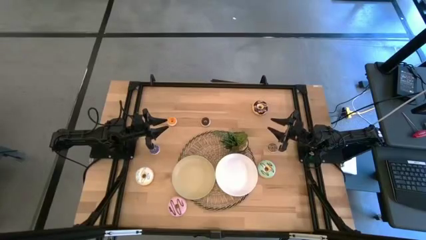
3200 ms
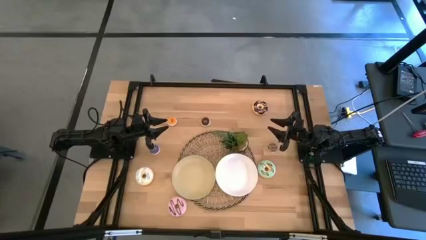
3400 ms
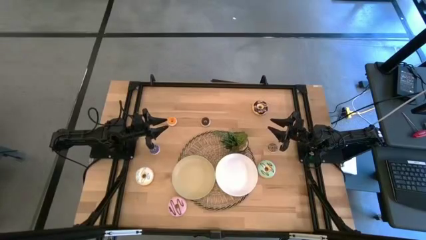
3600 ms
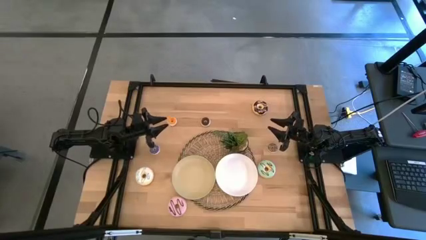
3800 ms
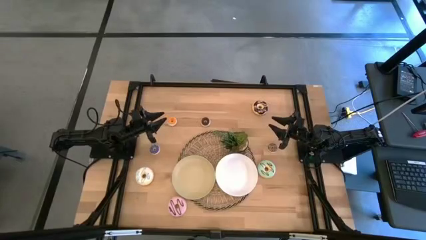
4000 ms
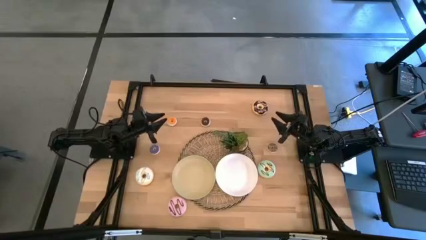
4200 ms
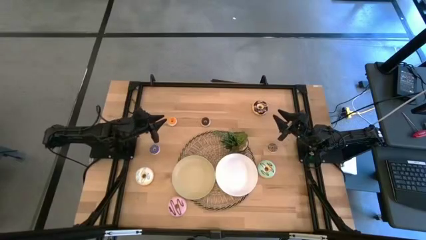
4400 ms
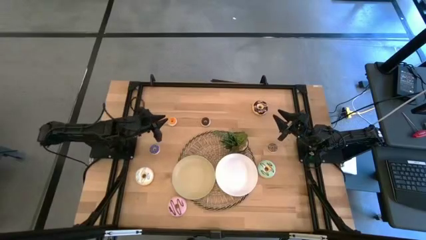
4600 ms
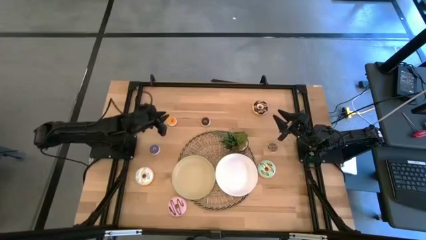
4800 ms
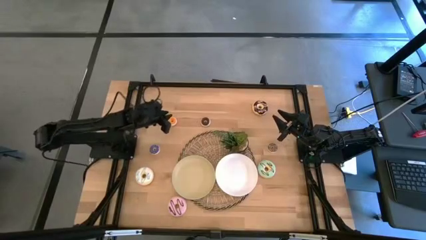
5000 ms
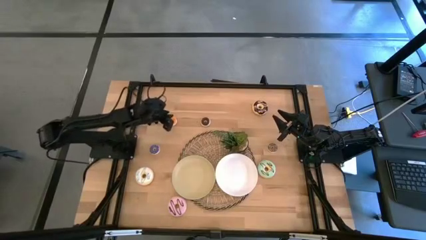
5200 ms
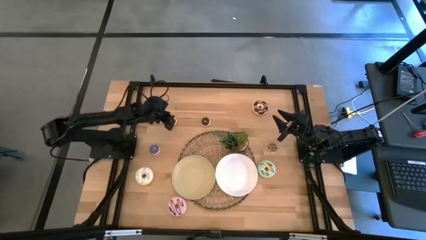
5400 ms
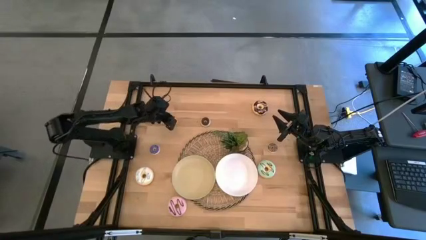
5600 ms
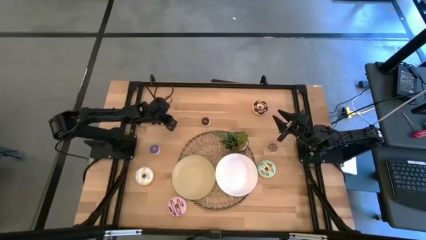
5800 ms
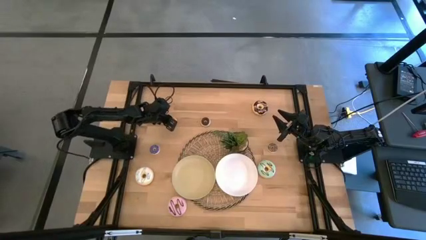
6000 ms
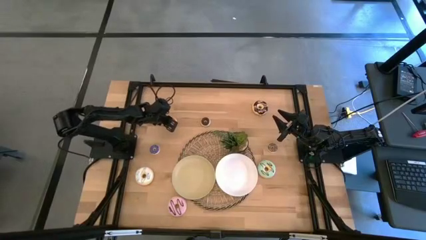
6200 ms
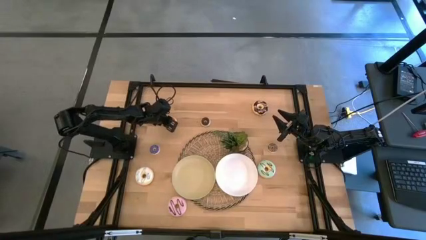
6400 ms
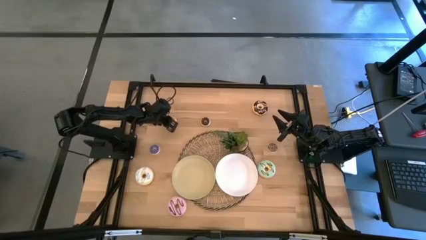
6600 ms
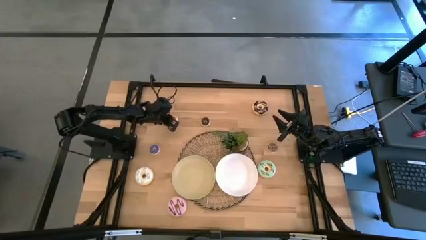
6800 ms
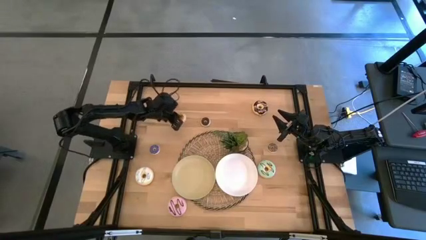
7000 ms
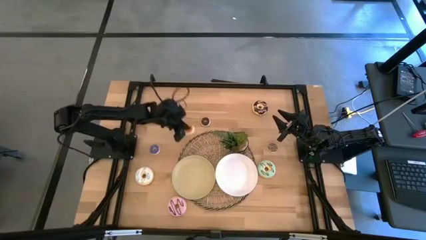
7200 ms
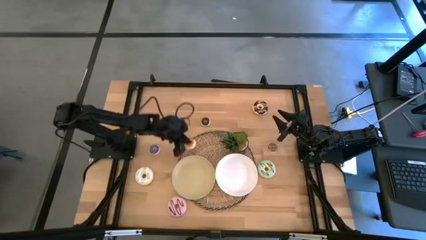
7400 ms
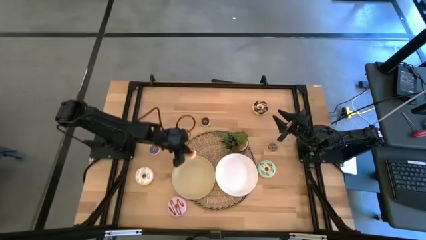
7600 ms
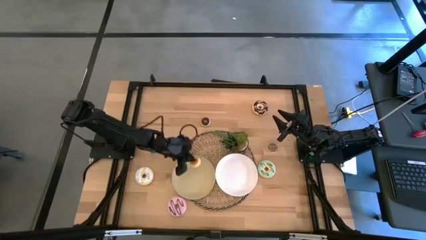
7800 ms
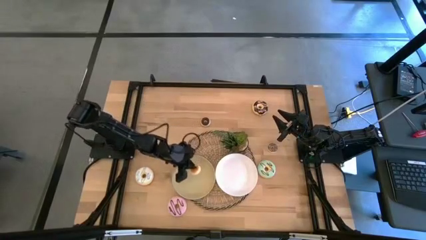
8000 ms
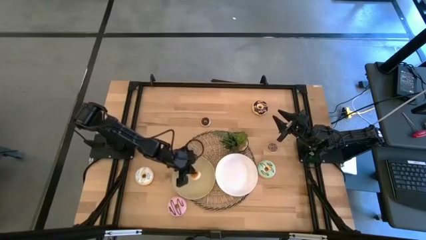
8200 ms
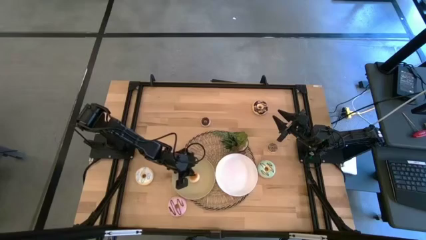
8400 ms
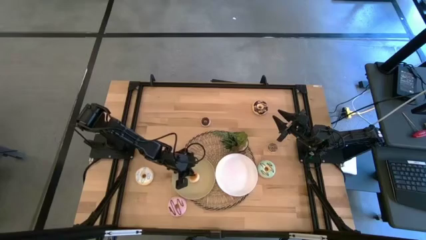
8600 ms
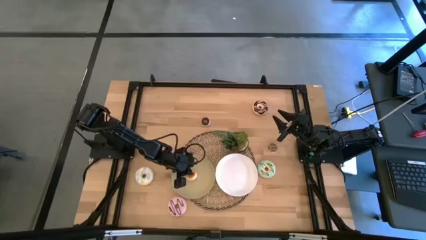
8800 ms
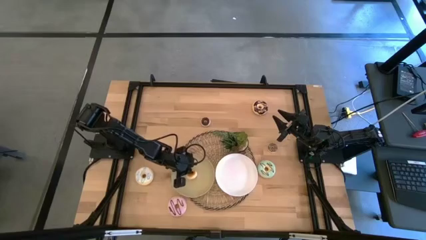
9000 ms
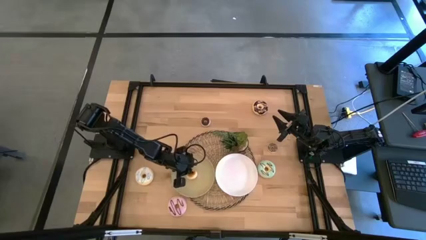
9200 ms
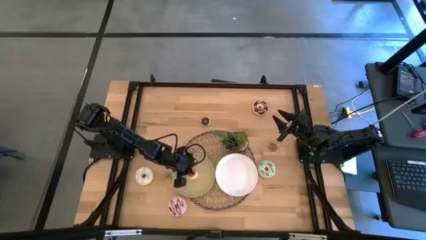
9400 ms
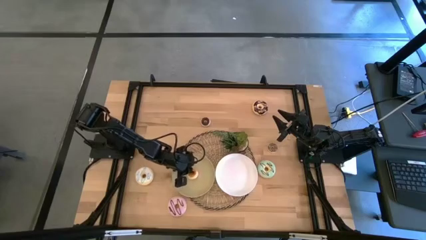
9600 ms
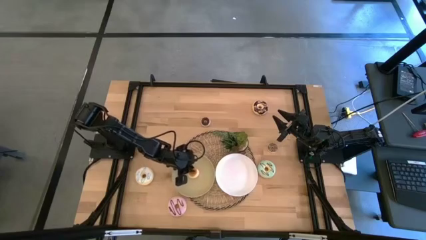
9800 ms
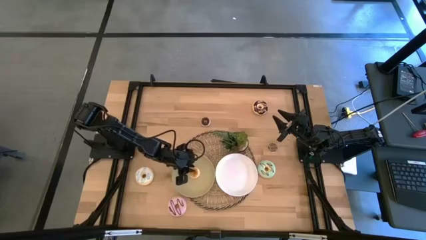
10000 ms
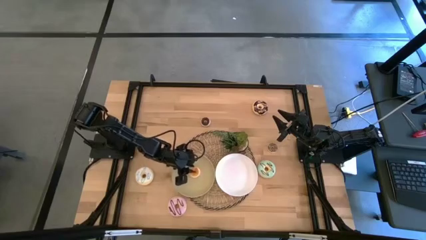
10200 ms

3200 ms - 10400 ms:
Task: Pick & Place donuts
Put the small orange donut on the brown plate

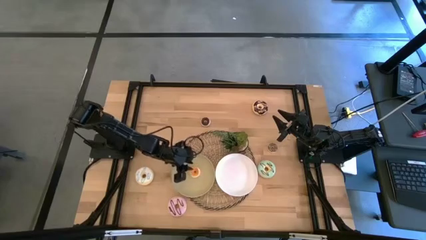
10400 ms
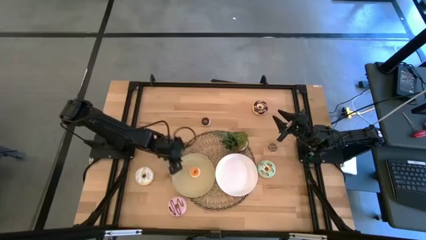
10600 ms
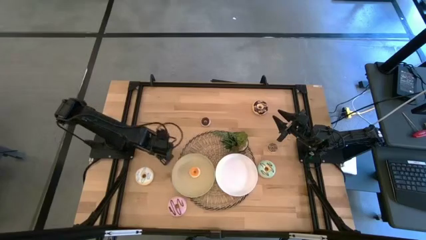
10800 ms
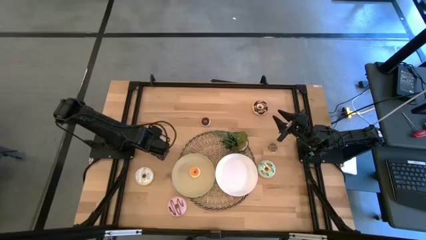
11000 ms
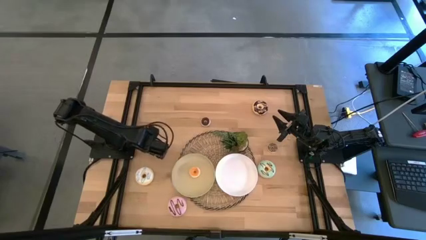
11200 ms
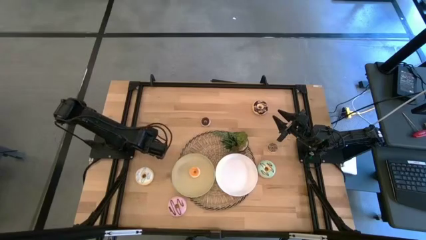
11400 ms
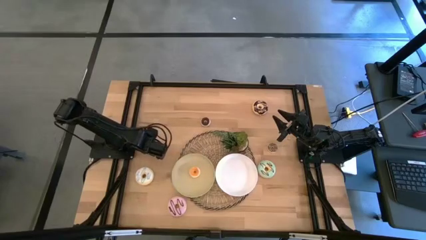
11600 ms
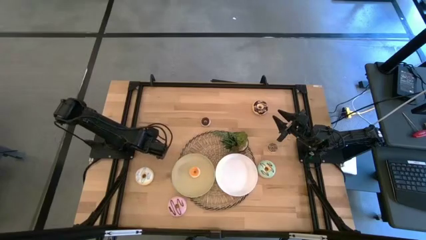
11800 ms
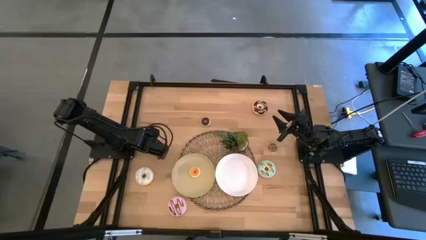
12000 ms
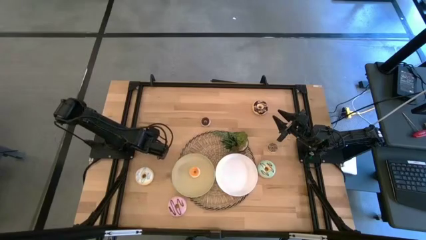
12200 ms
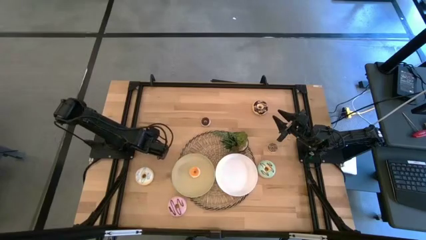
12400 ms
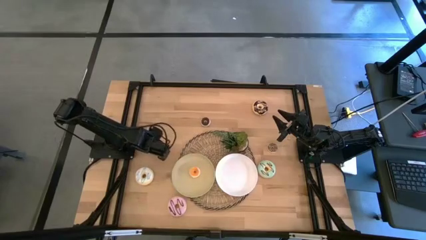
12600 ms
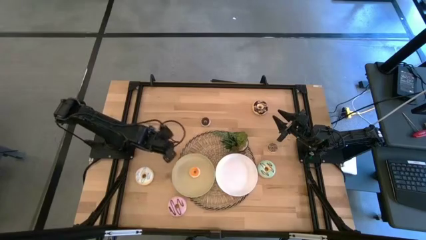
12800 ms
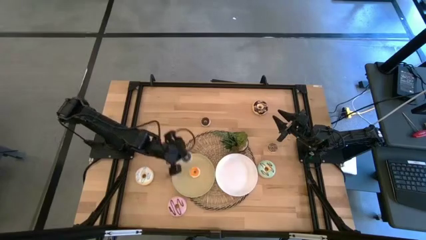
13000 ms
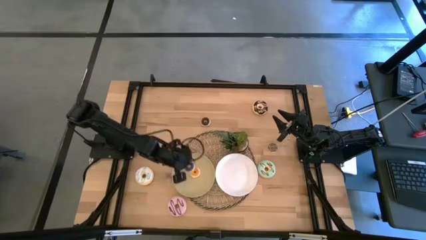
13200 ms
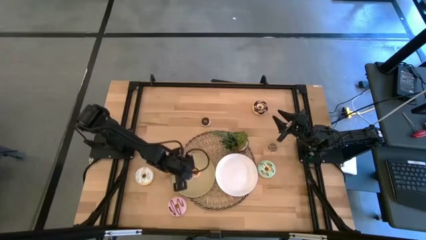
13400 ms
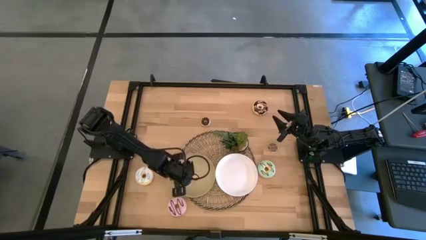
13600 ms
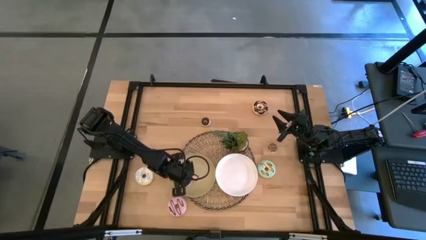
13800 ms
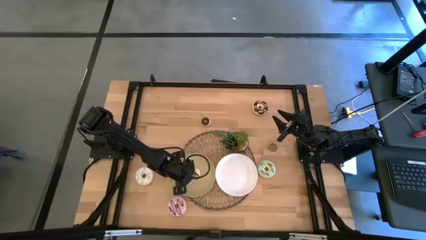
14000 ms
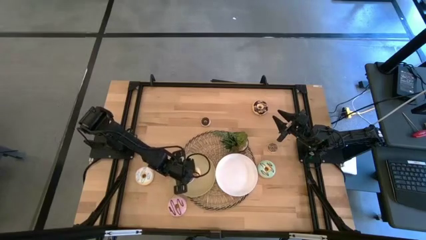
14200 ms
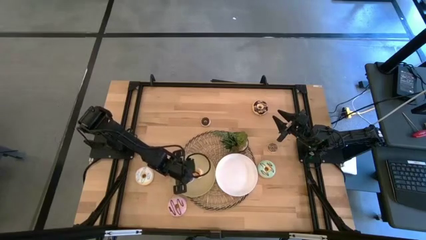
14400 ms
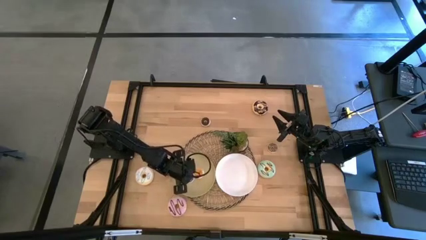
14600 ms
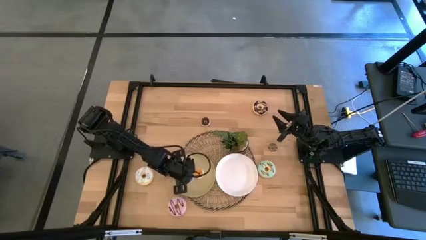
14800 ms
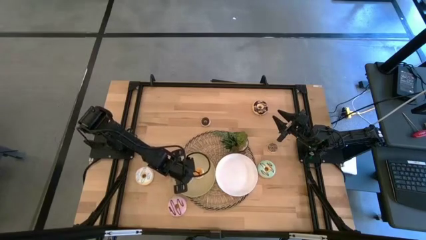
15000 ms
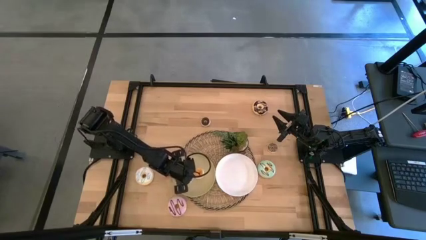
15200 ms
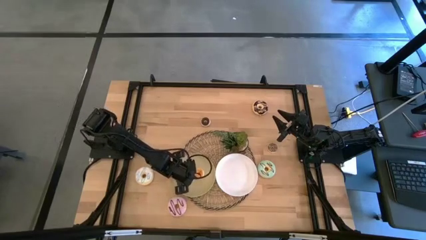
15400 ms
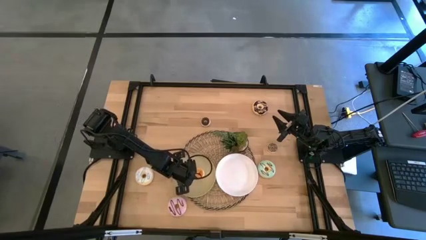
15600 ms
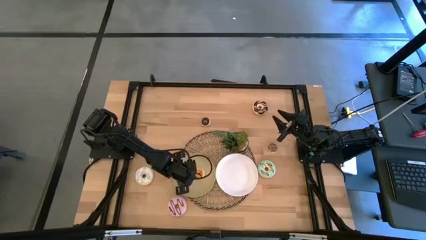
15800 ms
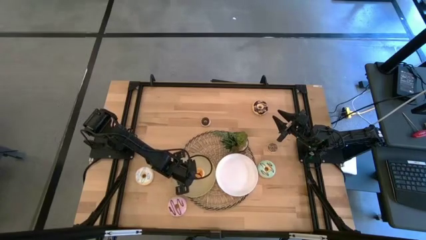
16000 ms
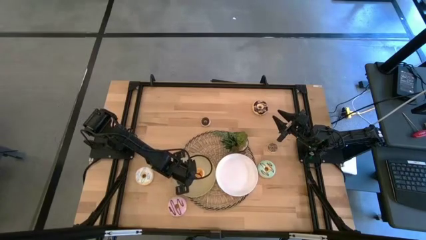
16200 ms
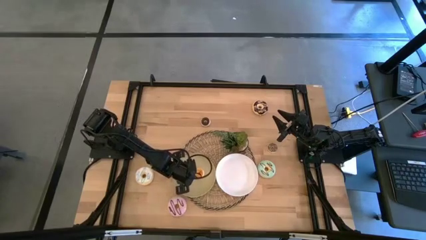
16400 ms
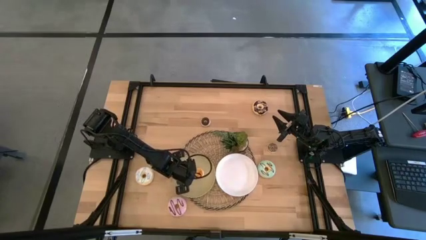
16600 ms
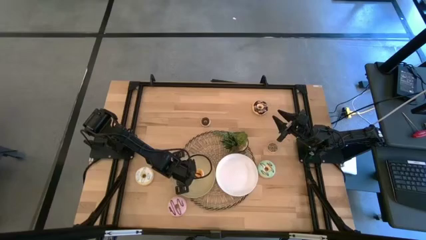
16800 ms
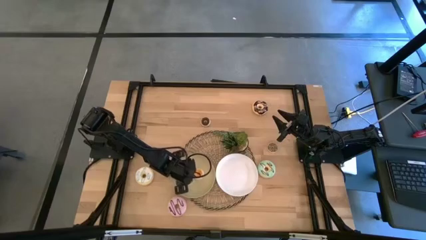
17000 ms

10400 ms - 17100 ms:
Put the small blue donut on the brown plate

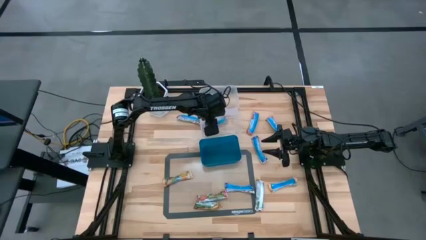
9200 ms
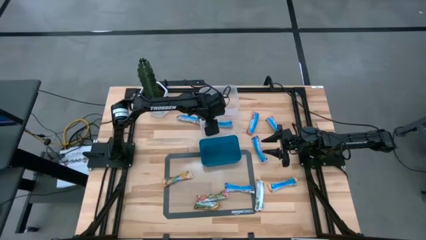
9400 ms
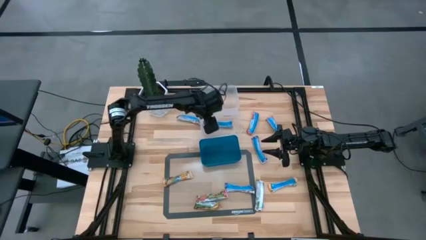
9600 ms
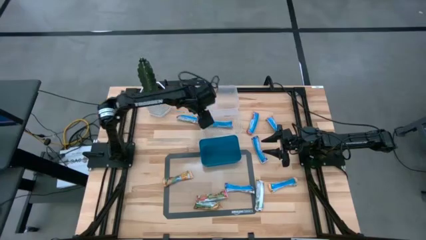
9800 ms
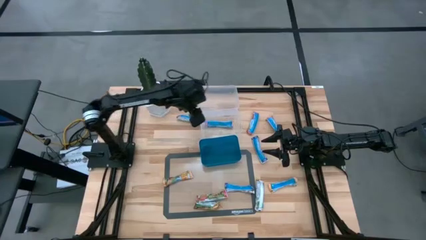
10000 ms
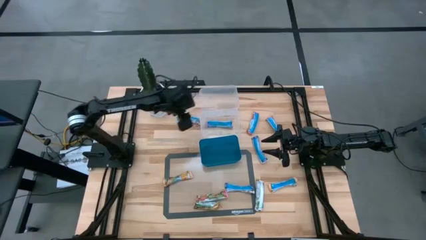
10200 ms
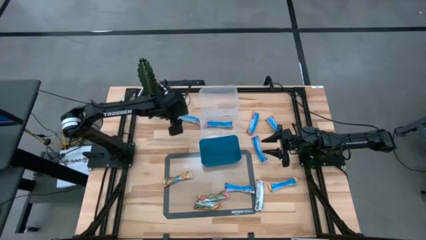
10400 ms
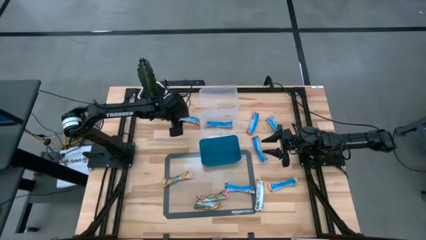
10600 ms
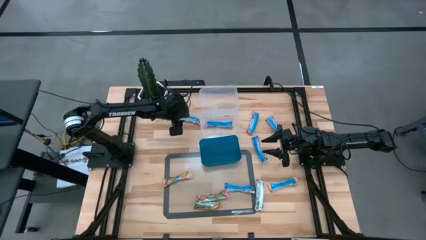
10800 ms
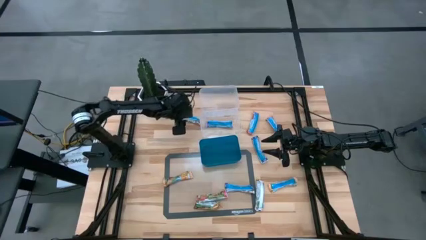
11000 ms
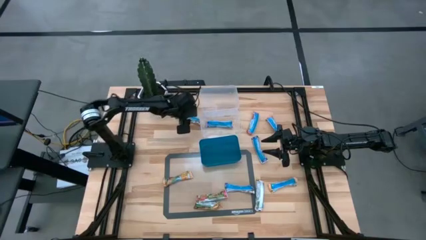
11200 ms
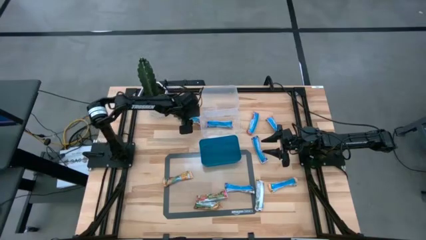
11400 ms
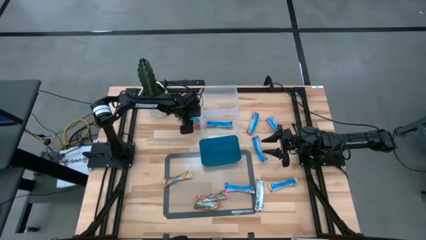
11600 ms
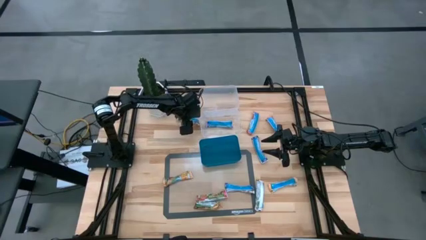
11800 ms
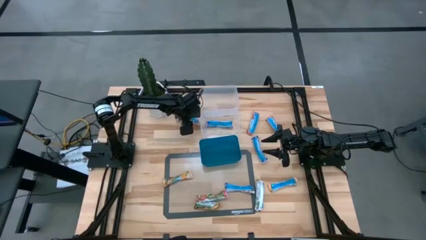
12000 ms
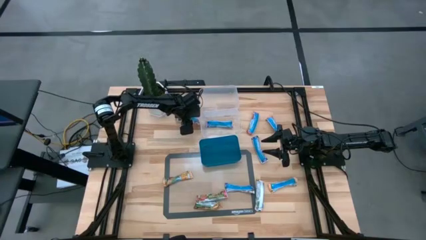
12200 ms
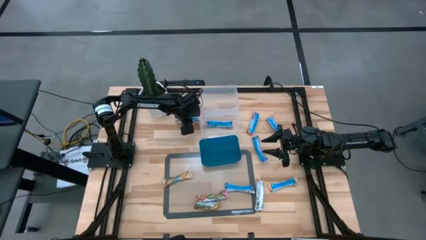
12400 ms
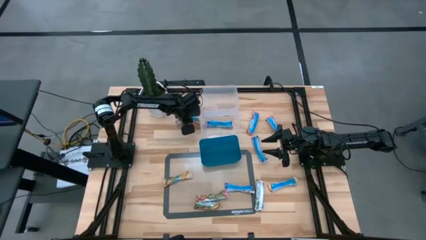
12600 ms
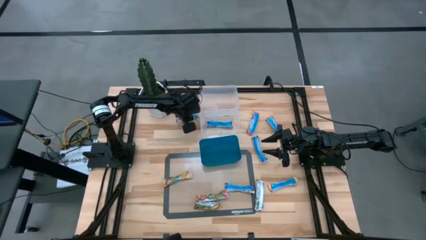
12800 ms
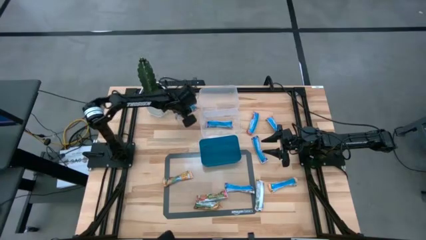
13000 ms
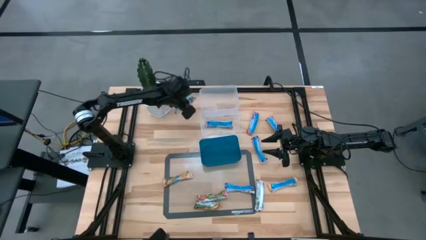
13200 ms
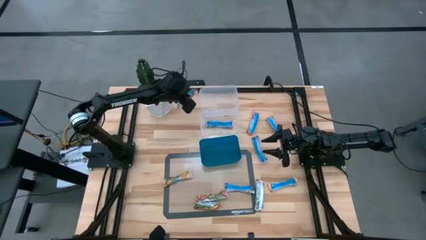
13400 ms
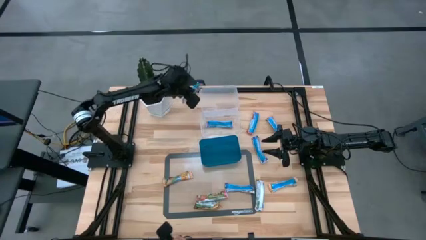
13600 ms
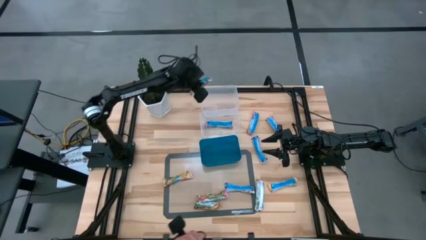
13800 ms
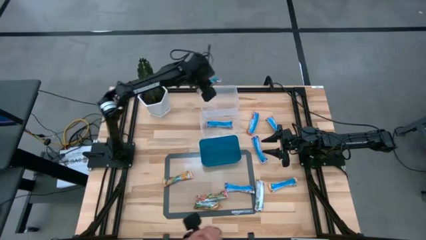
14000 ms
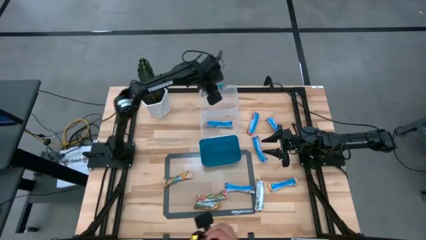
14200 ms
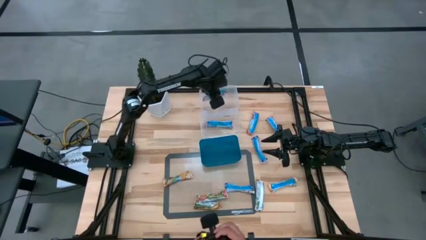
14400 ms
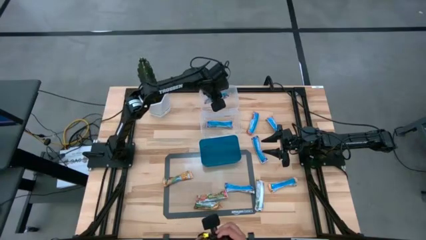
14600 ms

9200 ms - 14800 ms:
Task: Pick and place Granola Bars by type
Put the red granola bar into the top transparent bin
